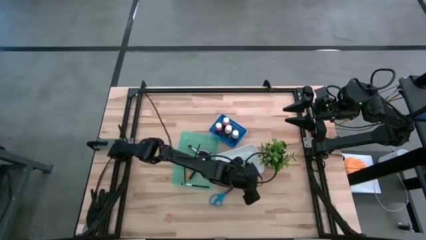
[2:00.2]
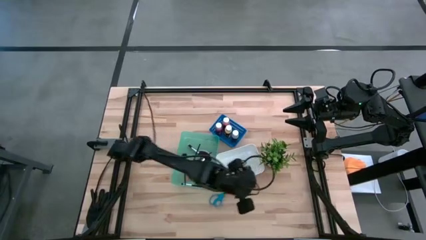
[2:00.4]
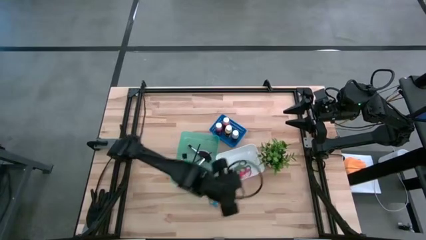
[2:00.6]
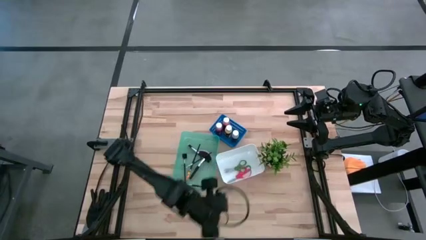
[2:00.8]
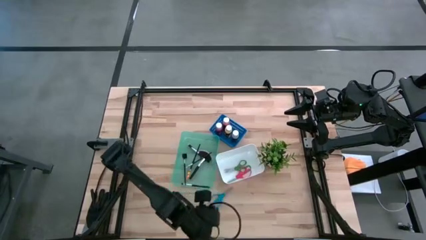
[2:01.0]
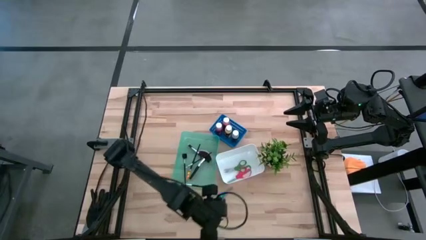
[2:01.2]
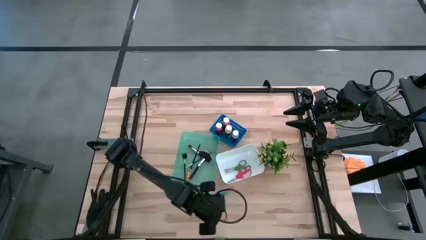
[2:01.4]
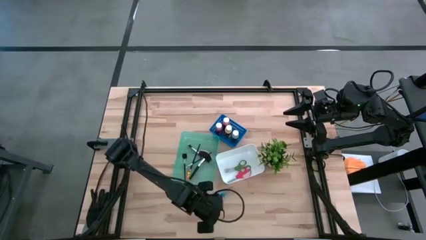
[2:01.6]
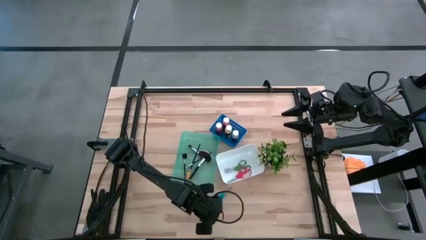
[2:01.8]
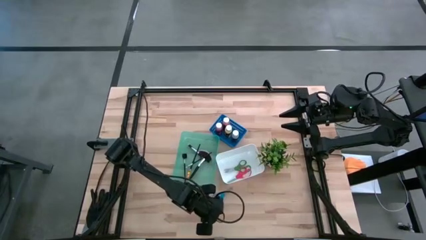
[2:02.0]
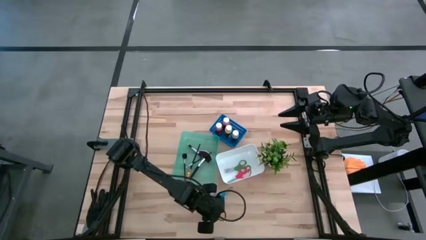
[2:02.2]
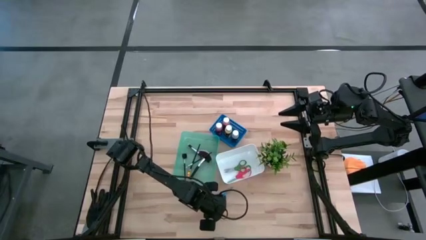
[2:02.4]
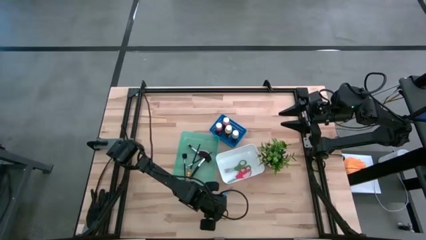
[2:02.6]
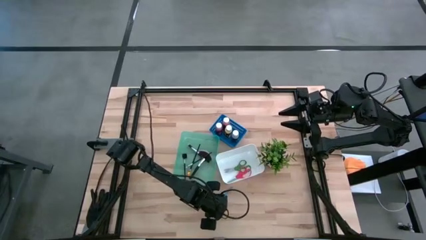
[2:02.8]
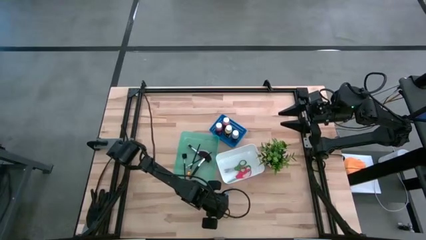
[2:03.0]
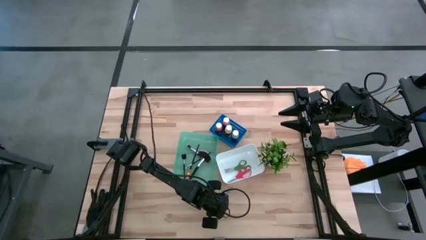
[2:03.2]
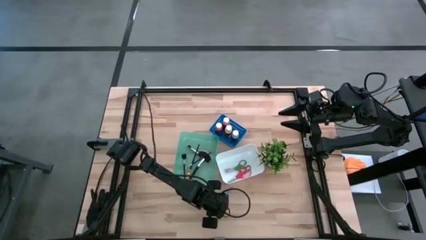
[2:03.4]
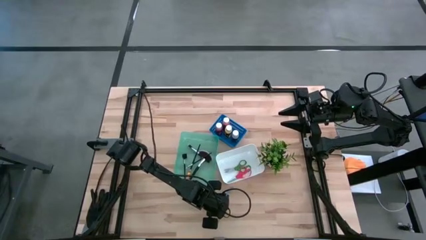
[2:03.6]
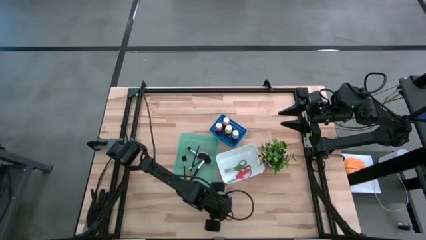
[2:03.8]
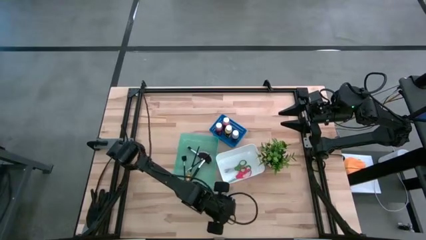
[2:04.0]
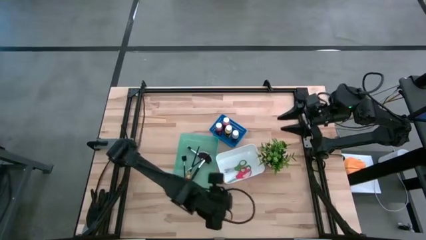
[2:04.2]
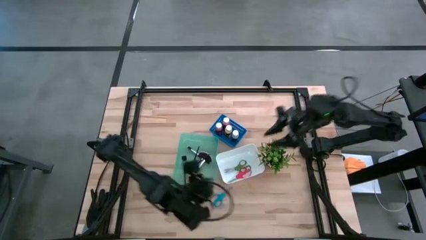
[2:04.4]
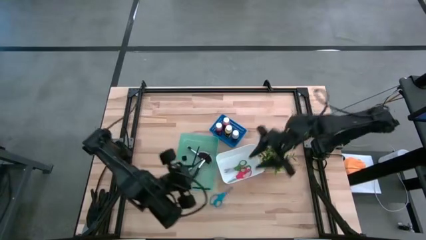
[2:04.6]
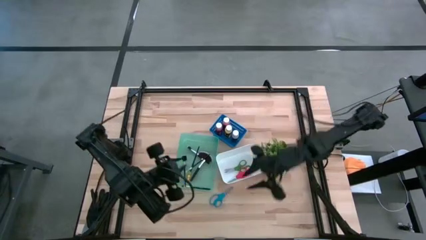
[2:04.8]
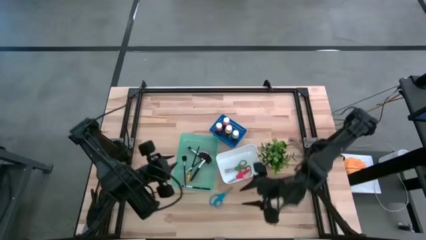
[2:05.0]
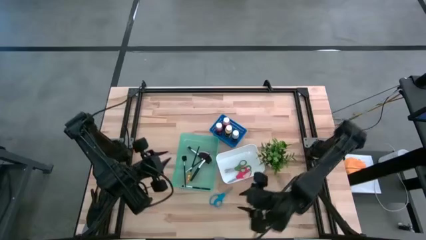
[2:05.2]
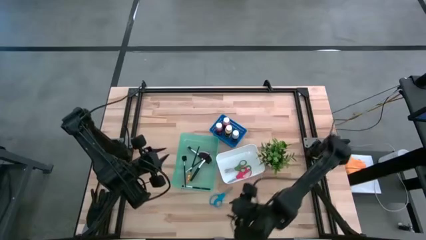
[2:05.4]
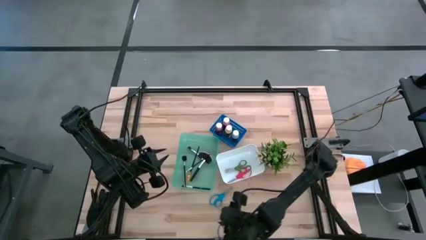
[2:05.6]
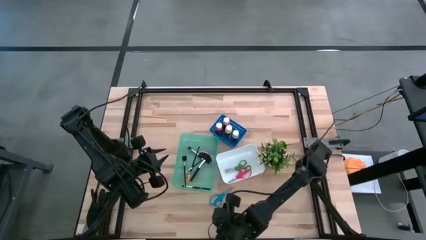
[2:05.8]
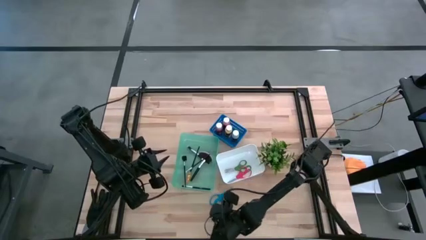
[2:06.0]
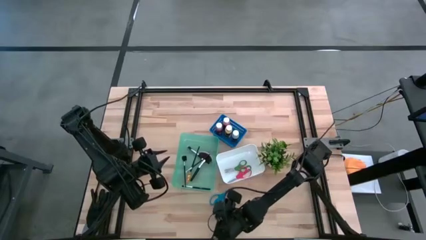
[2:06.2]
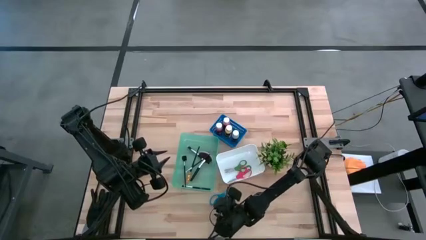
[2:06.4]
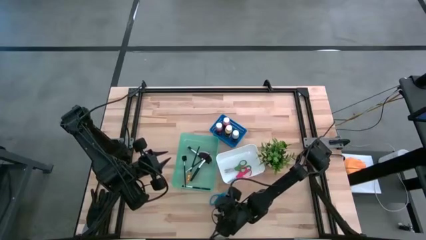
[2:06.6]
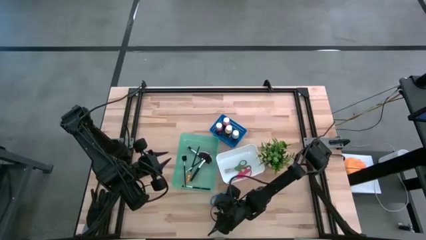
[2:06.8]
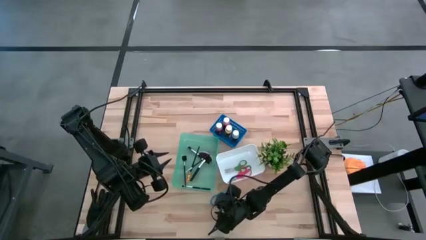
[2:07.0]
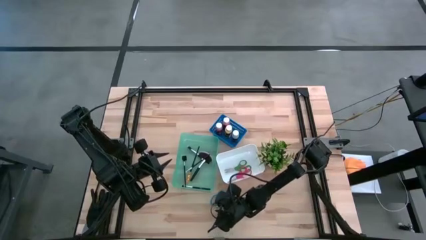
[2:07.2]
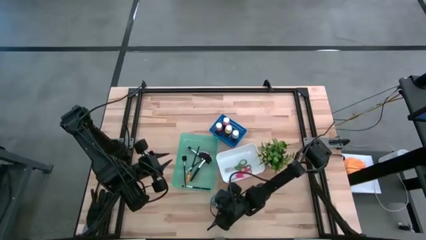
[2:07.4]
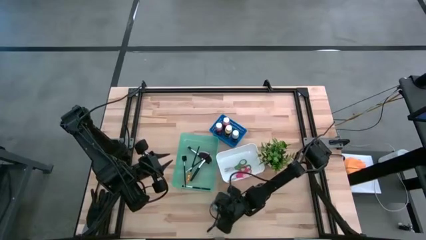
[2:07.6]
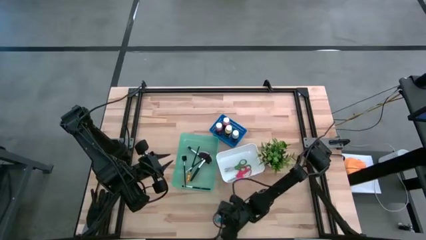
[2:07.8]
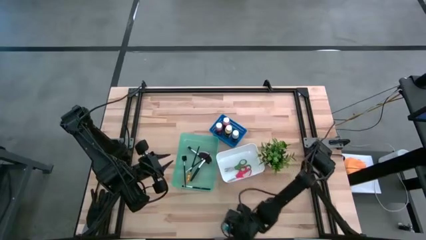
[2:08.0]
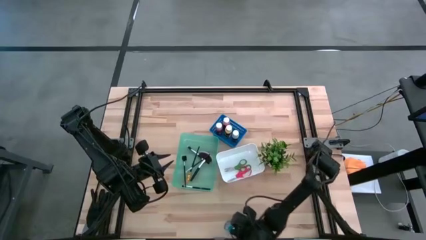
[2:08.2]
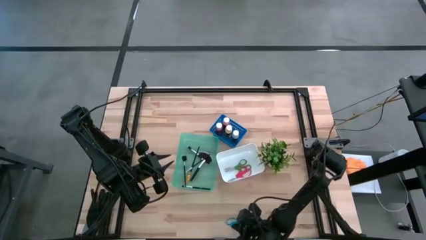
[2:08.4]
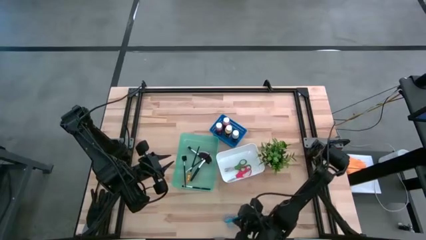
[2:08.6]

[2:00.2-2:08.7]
Task: Pick & Place Paint Supplies
Put the blue scissors into the white bin

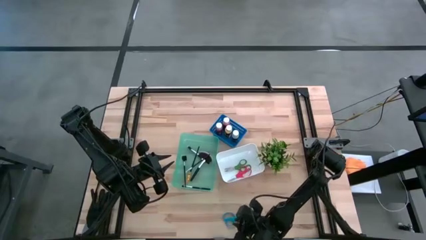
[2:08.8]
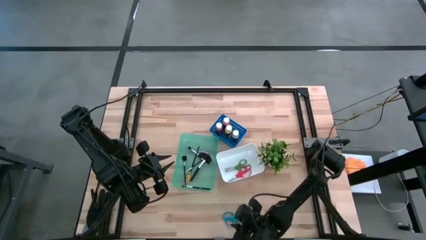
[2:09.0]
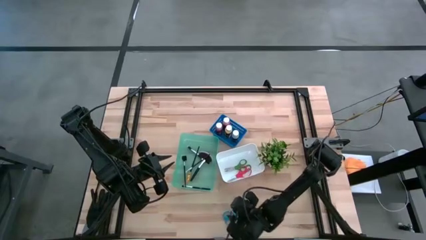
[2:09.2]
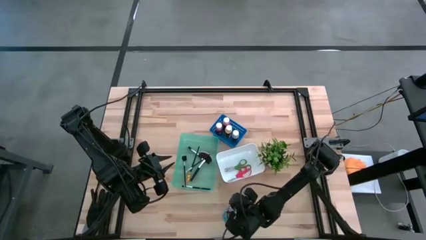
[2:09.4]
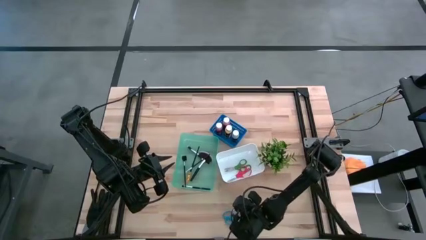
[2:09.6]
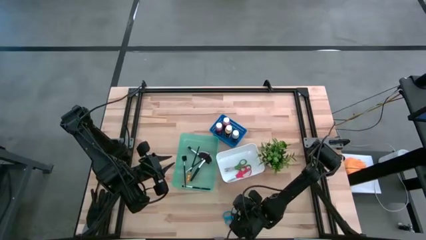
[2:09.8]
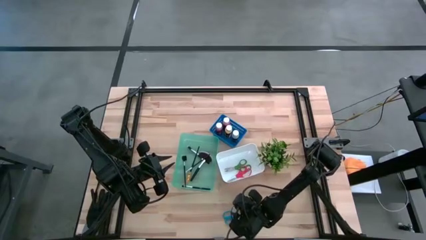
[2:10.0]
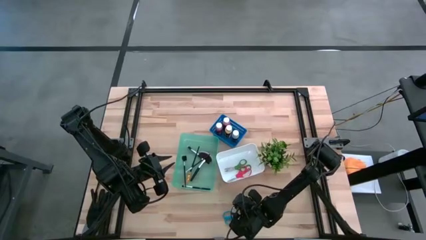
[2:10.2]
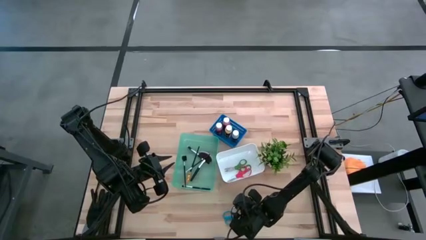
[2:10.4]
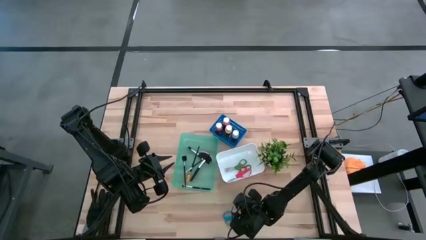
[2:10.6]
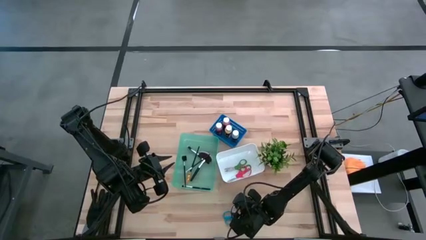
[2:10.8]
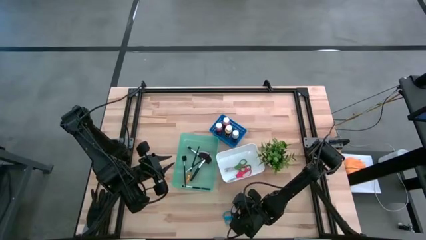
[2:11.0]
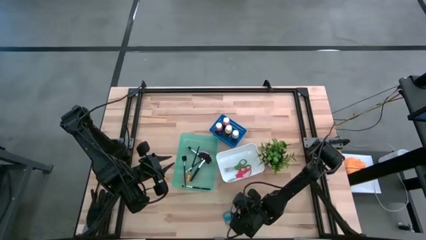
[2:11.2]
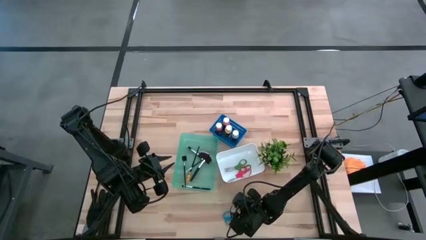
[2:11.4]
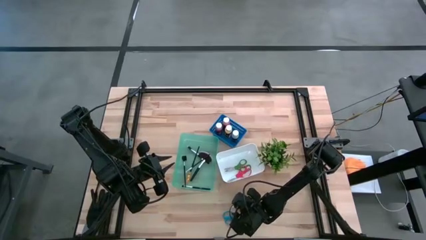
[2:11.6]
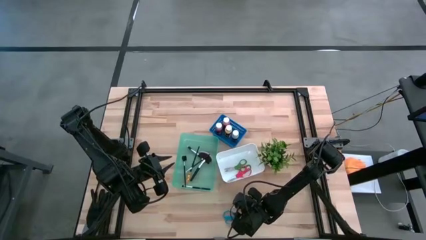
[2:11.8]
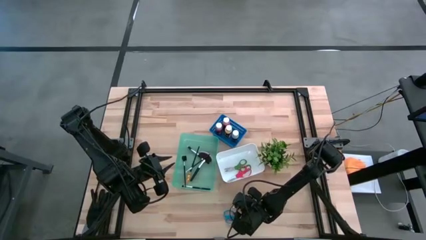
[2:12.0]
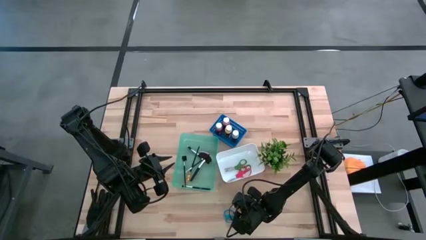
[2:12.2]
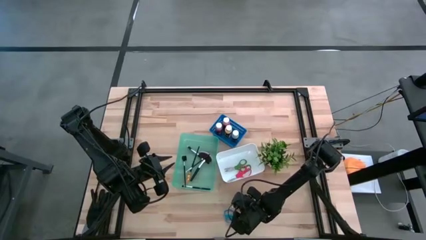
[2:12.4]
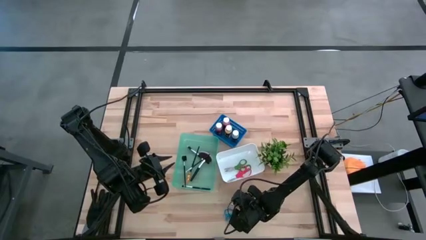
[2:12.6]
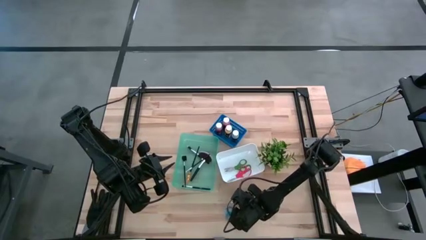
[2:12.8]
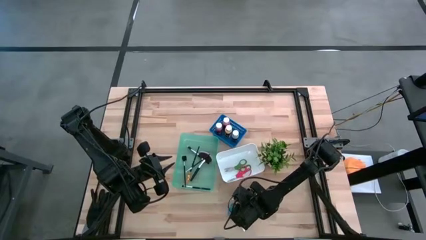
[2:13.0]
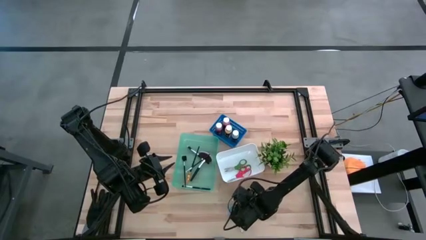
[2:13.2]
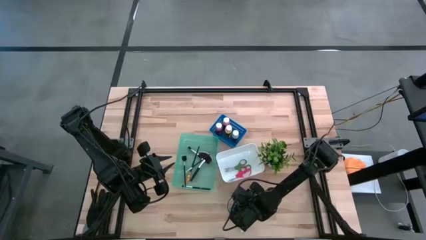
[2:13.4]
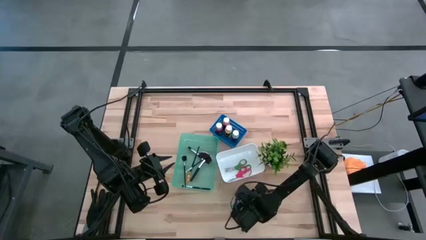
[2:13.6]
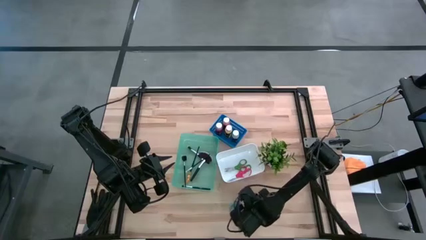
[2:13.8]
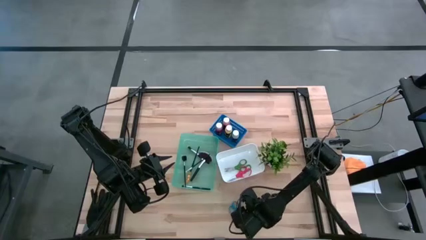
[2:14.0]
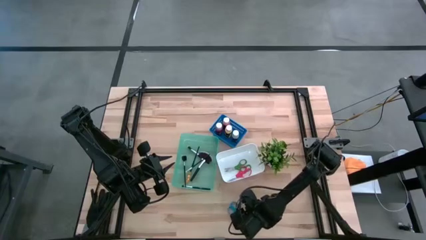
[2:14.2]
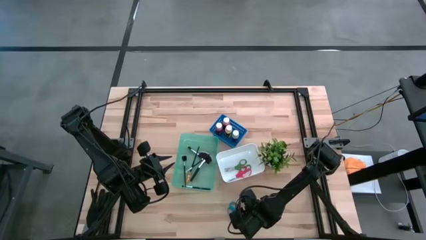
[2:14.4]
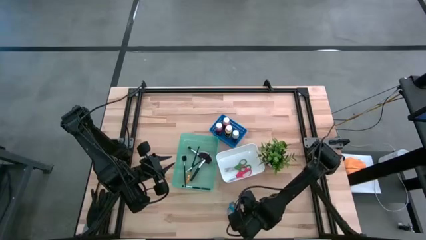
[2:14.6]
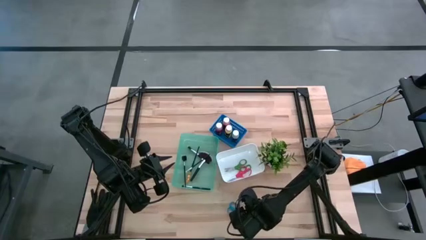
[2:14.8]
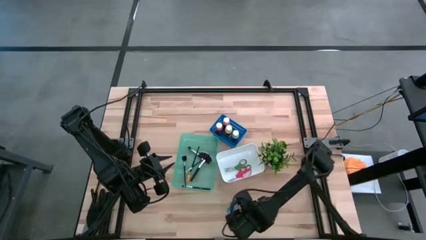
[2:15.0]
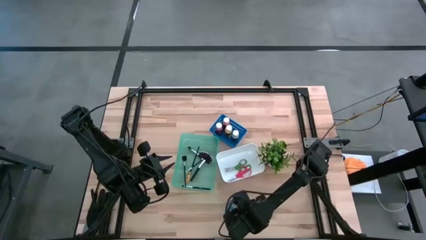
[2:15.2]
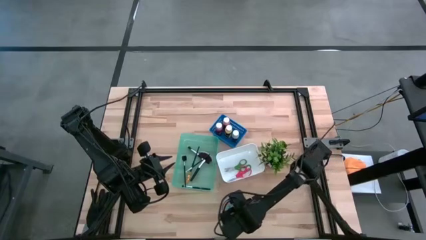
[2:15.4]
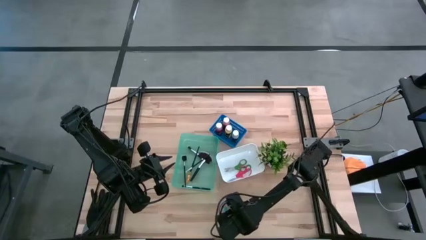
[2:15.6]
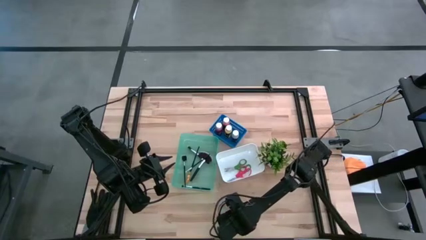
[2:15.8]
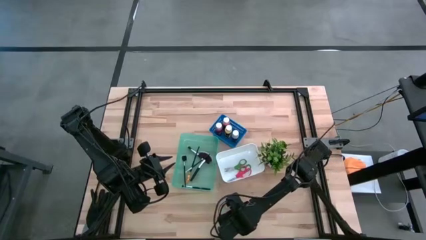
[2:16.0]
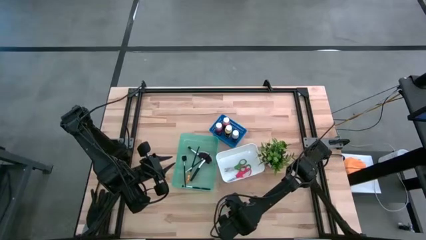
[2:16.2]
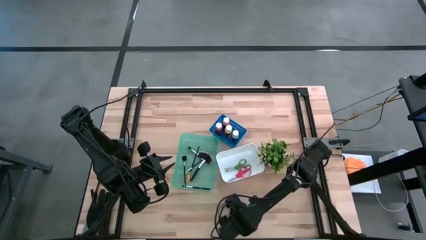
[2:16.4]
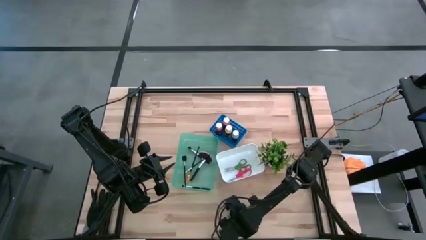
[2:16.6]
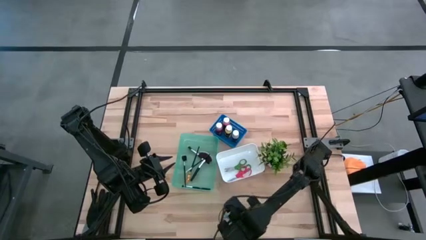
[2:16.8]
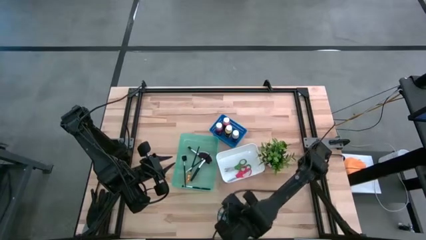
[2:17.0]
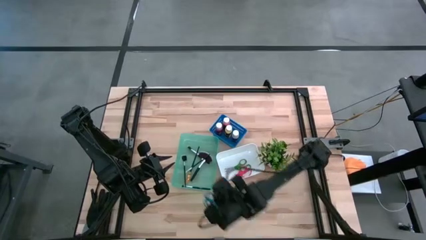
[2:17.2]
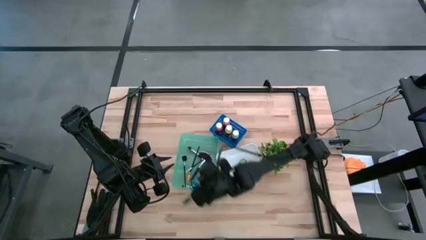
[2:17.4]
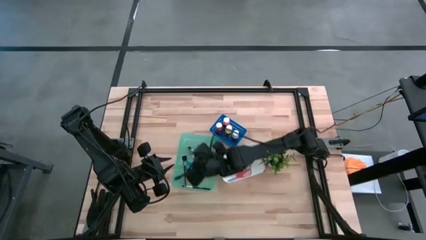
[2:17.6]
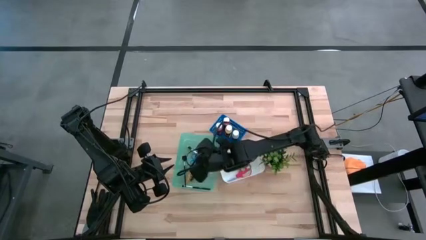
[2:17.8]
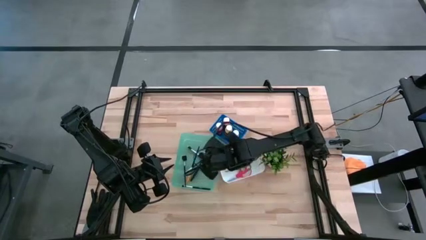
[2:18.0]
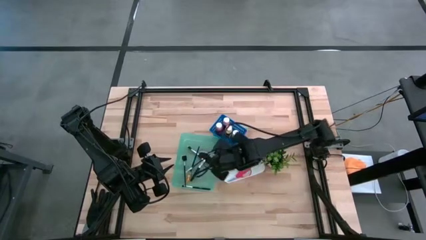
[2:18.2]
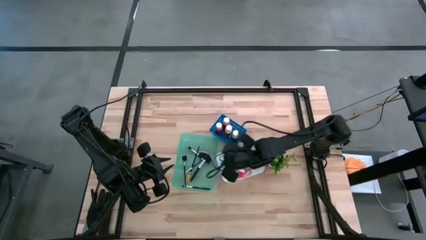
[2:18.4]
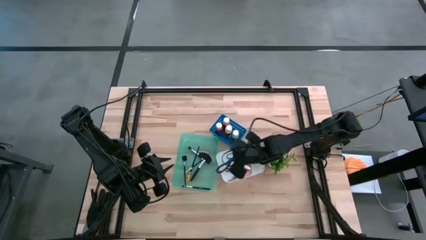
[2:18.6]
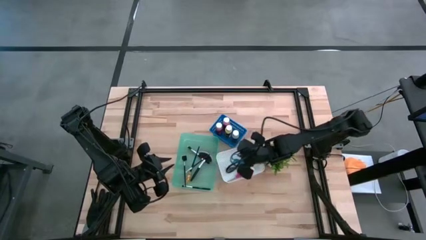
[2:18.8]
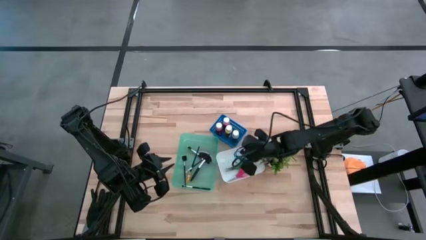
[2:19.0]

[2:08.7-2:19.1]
Put the blue scissors into the white bin
